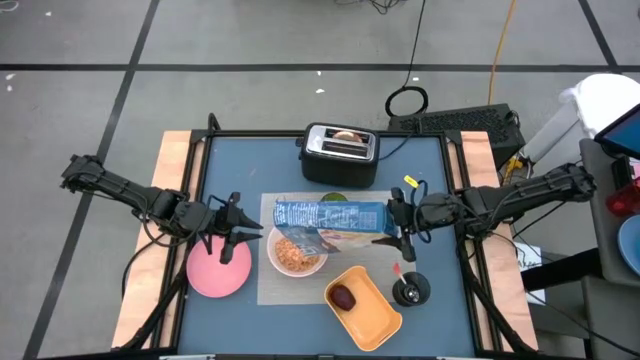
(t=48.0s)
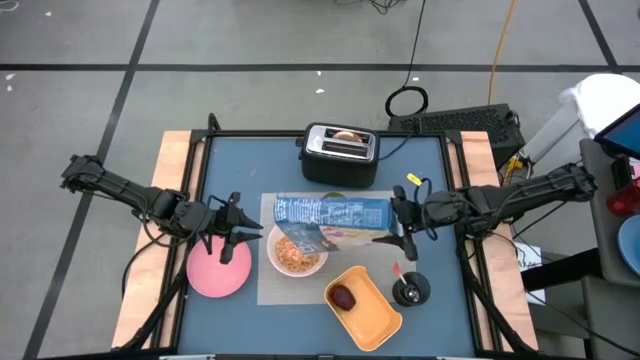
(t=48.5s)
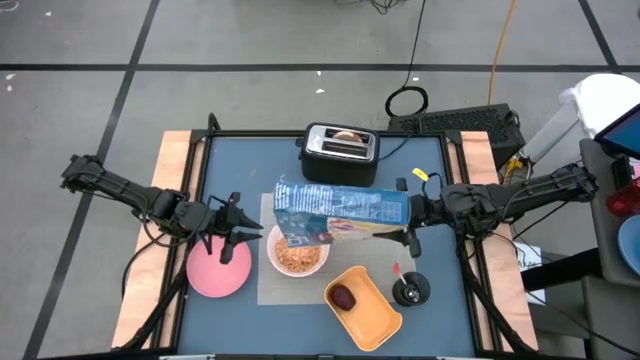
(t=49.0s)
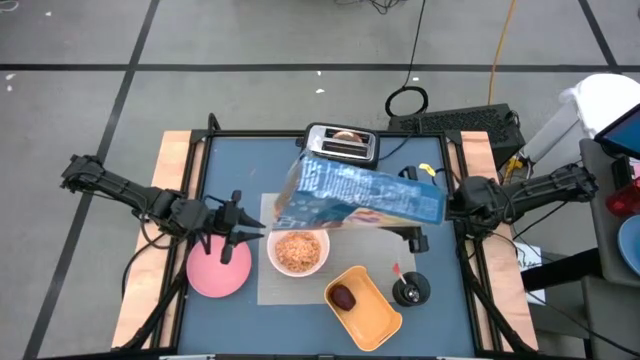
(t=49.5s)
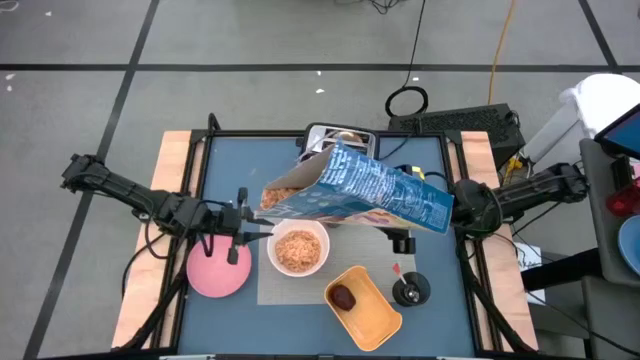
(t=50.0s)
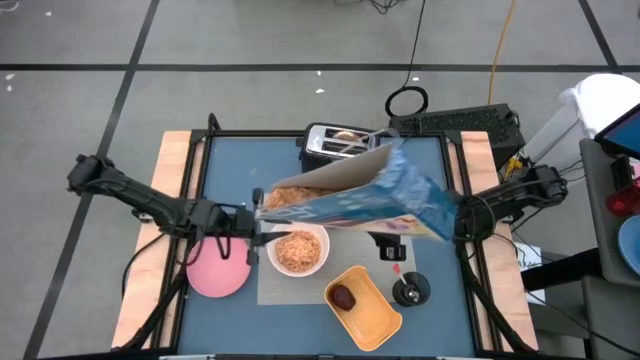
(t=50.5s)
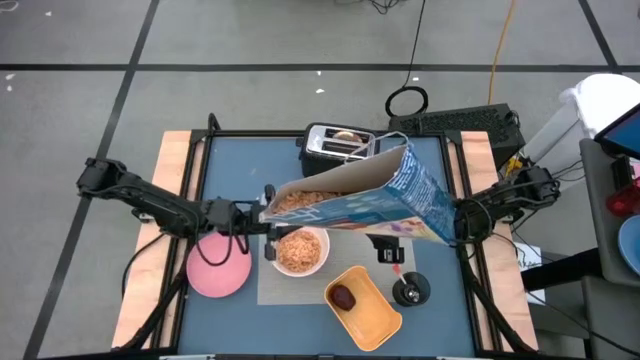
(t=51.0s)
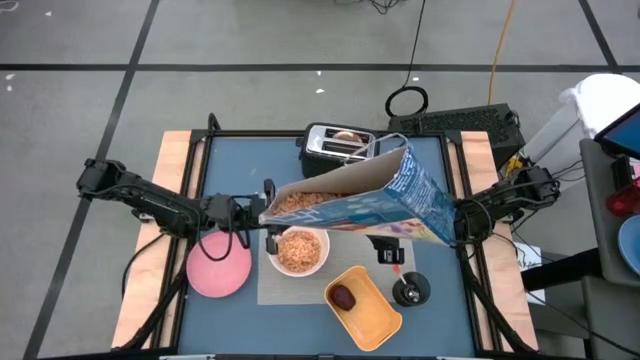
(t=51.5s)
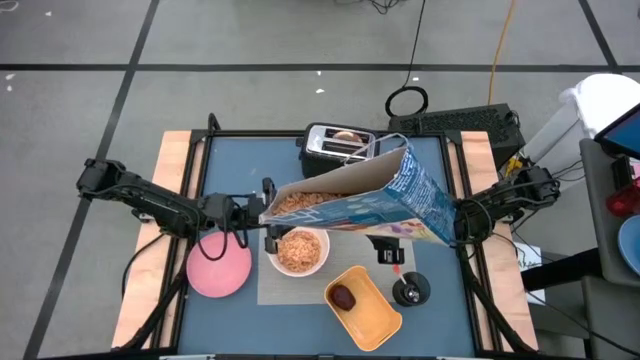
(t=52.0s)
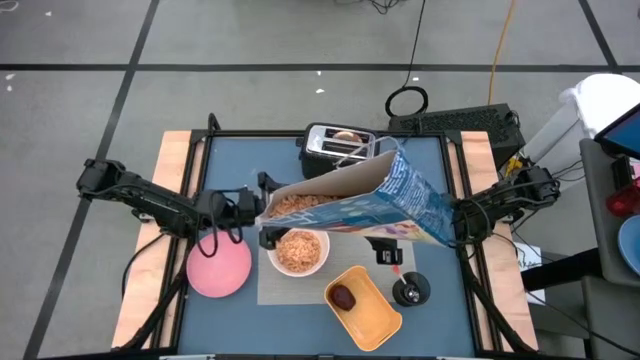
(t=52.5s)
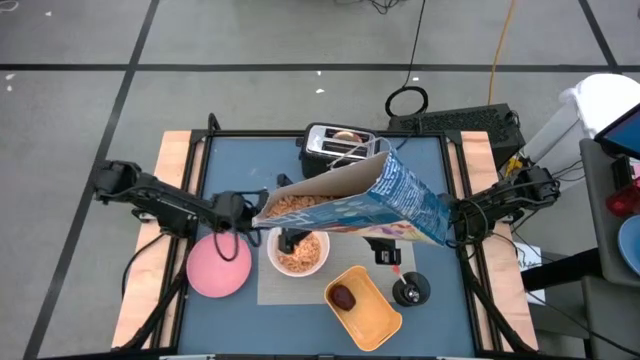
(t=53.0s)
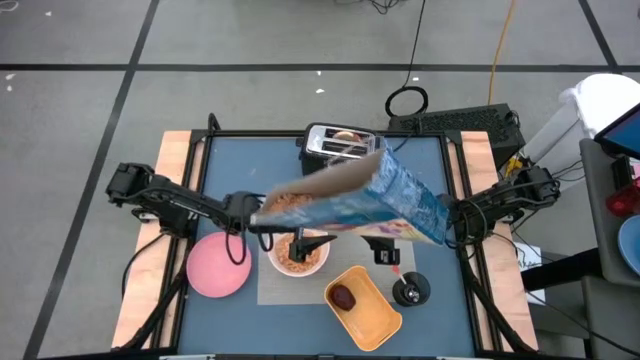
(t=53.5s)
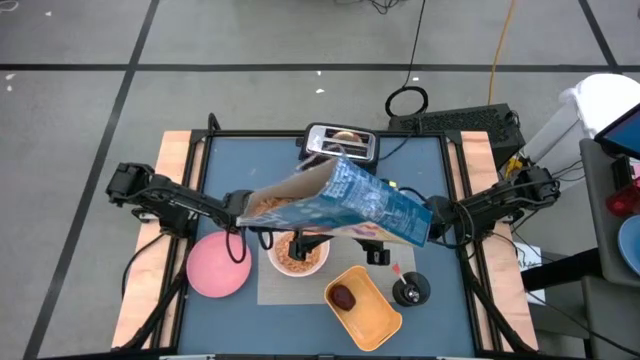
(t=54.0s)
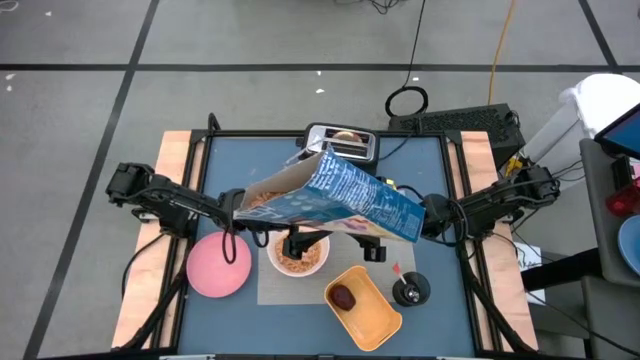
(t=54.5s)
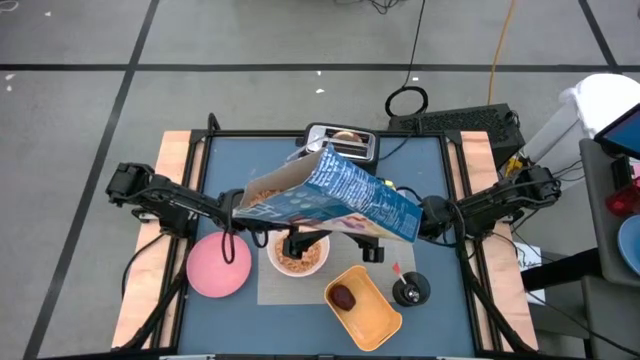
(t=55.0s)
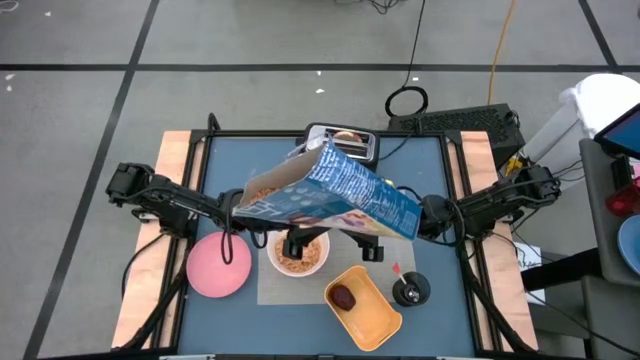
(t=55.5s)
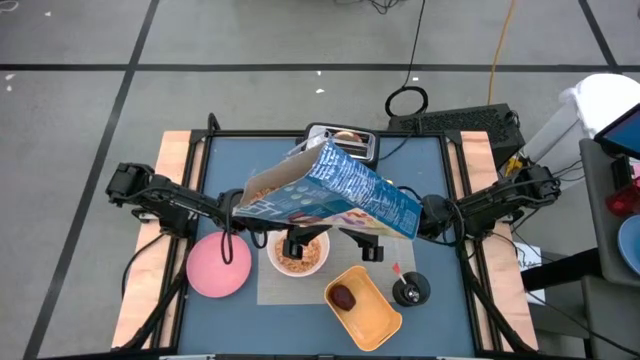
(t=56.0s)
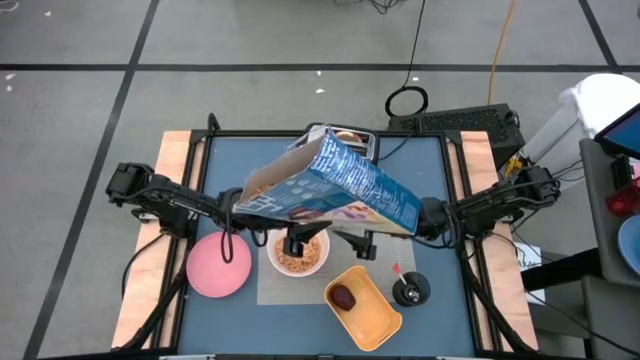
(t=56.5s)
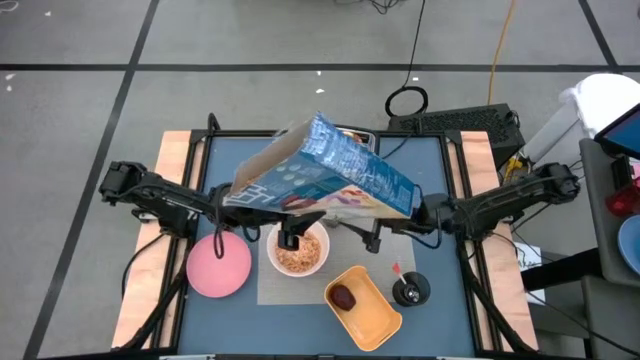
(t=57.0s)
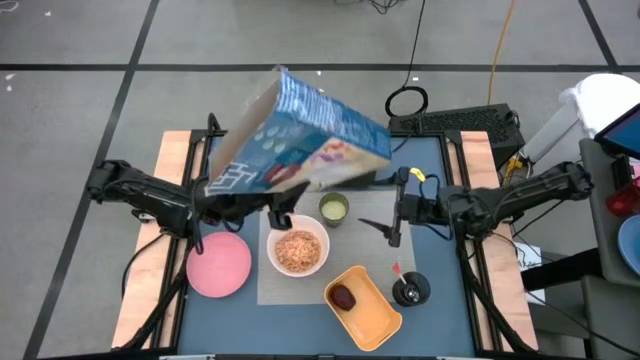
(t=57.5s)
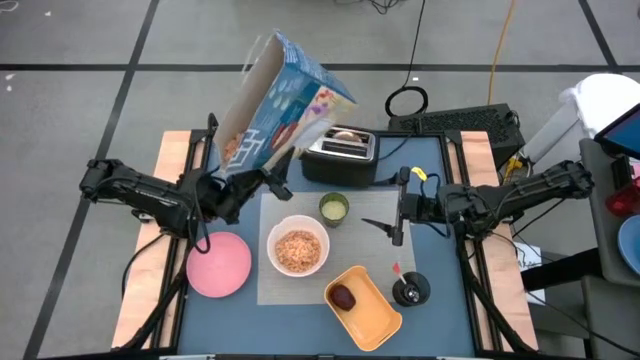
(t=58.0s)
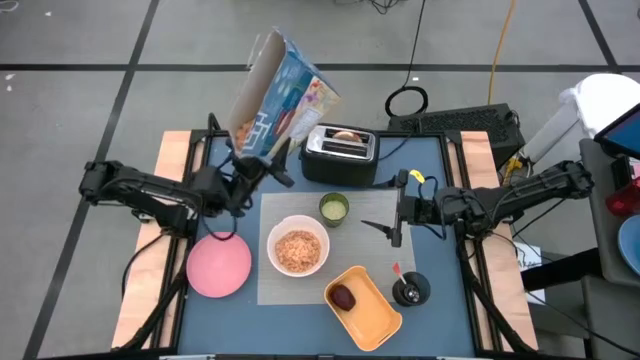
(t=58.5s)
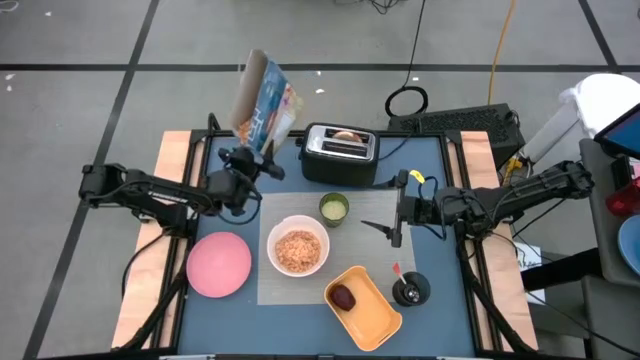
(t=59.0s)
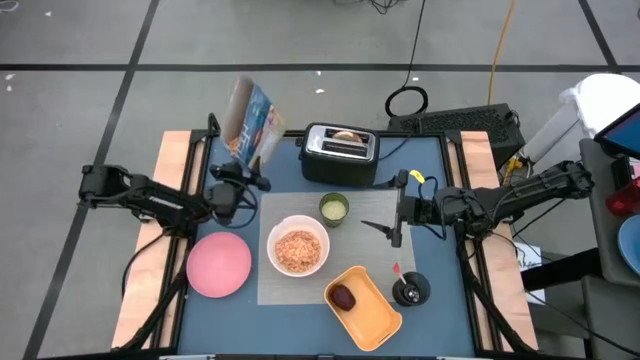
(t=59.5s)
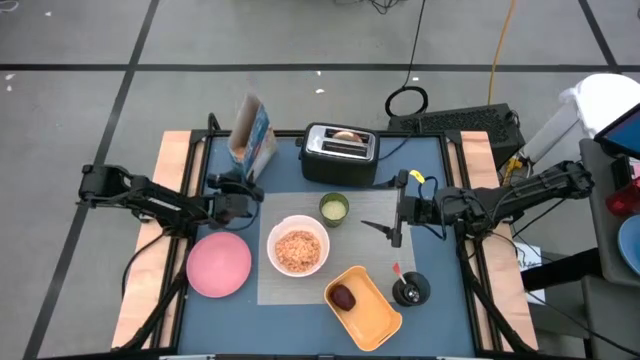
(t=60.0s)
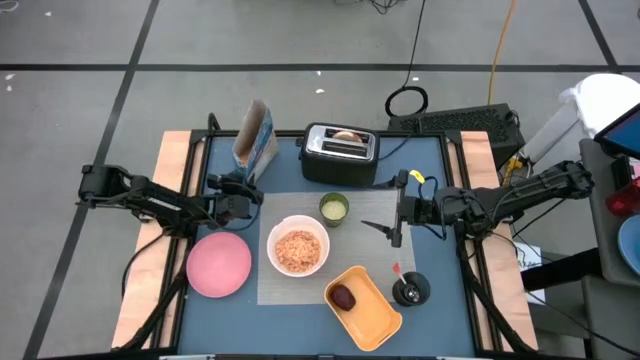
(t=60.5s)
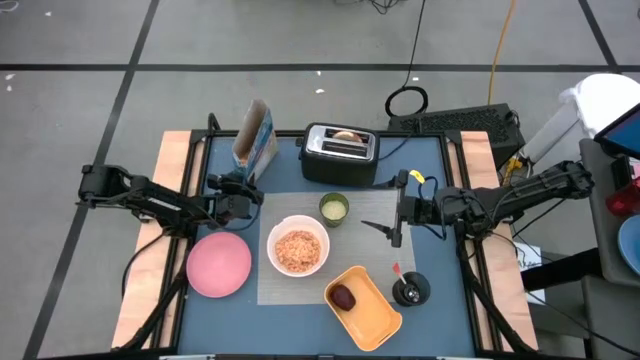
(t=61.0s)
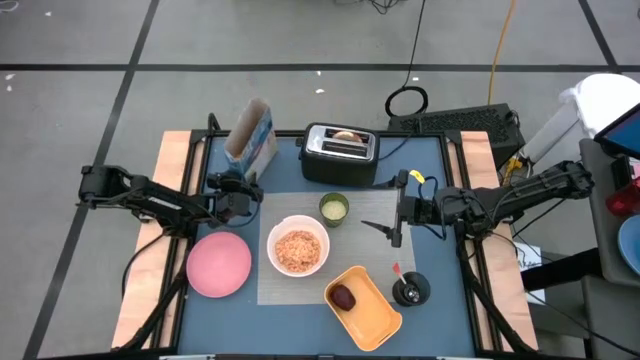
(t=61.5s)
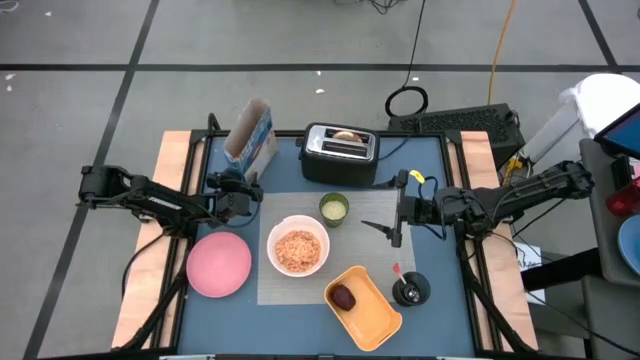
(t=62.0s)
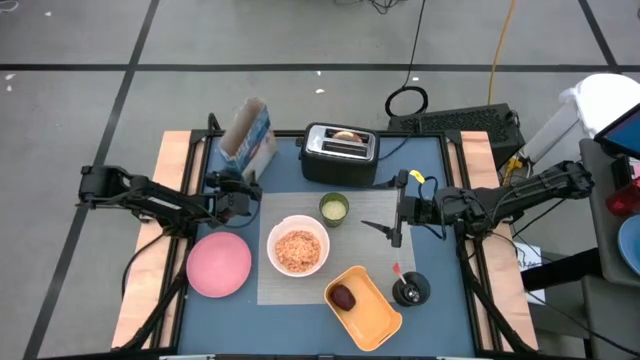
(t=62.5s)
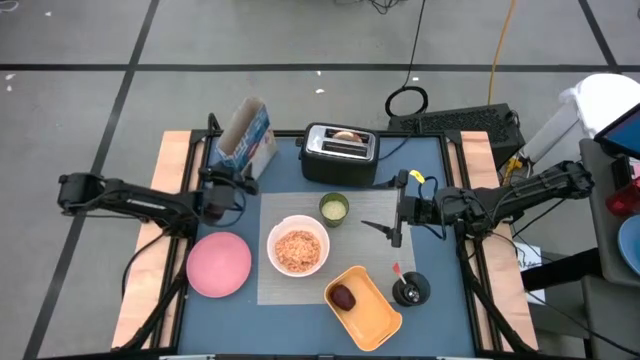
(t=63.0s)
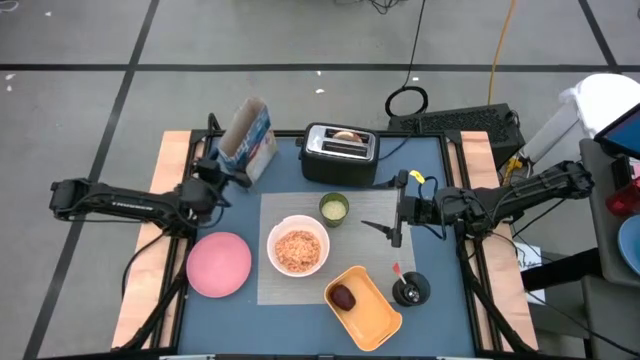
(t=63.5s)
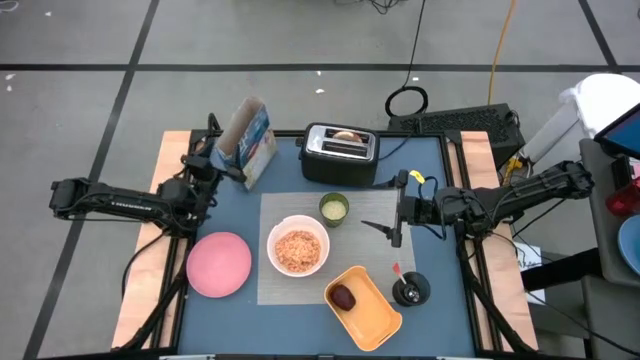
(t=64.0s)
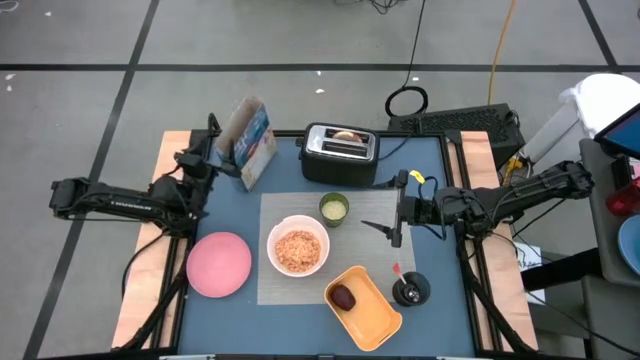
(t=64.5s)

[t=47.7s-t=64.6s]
Task: Arrange a breakfast setting
Pour the cereal into the white bowl

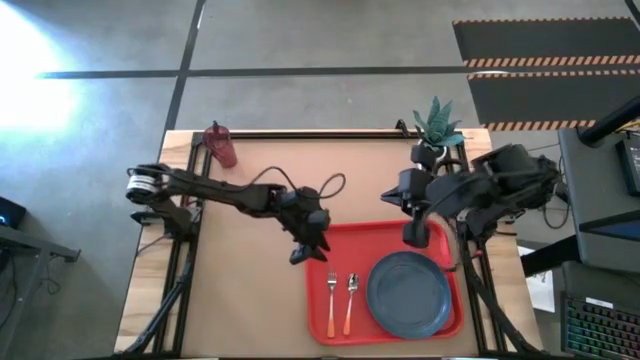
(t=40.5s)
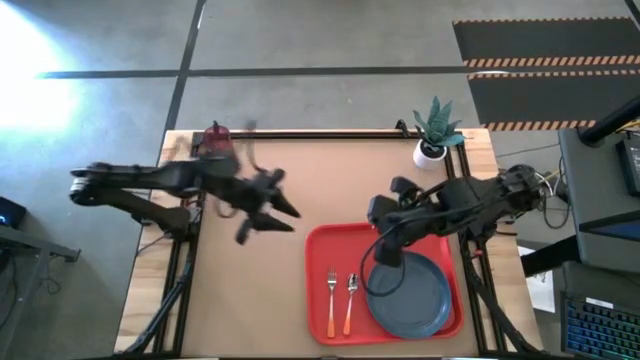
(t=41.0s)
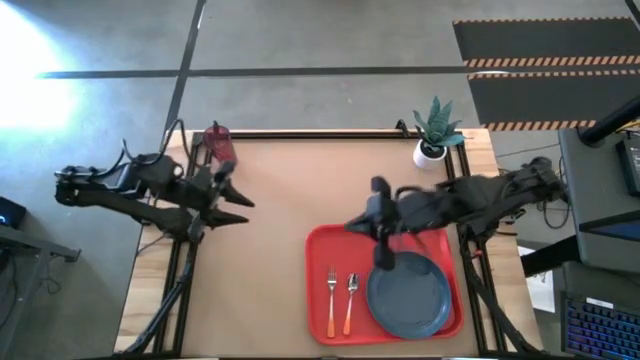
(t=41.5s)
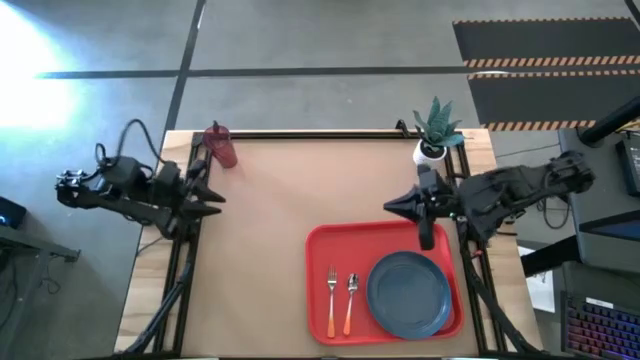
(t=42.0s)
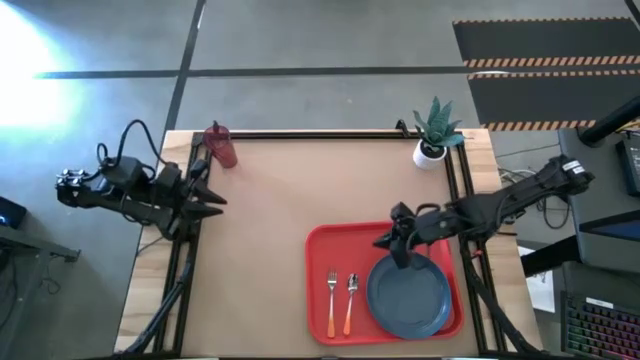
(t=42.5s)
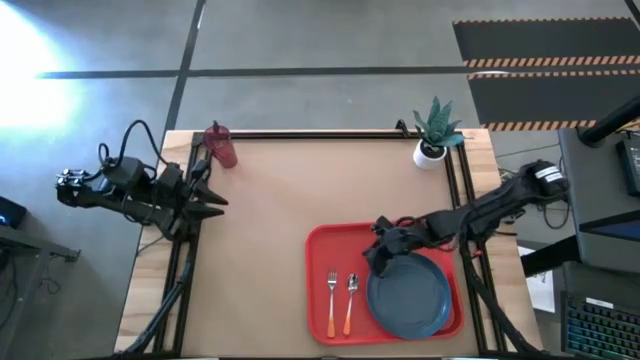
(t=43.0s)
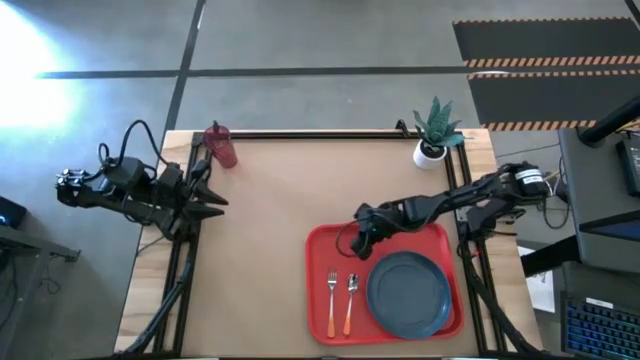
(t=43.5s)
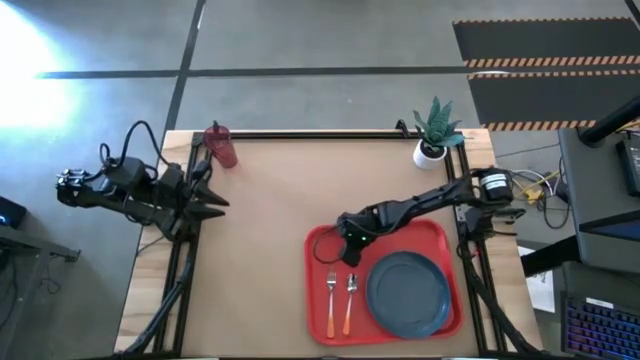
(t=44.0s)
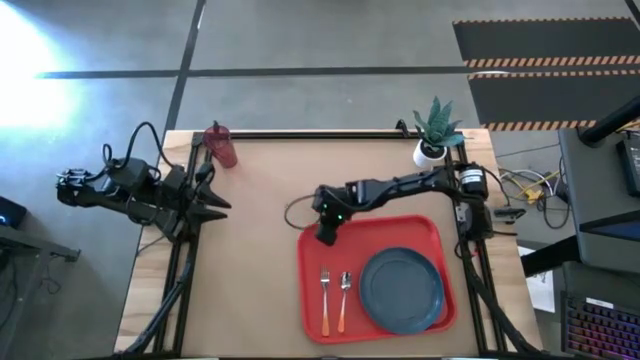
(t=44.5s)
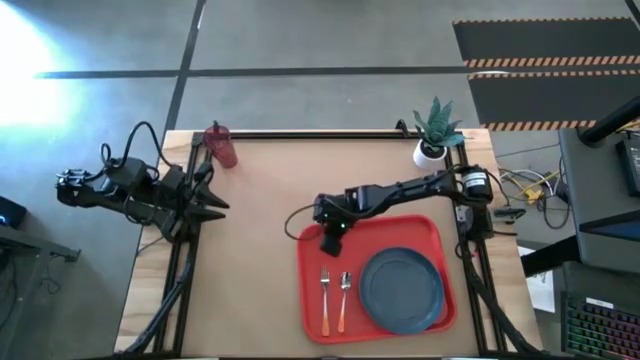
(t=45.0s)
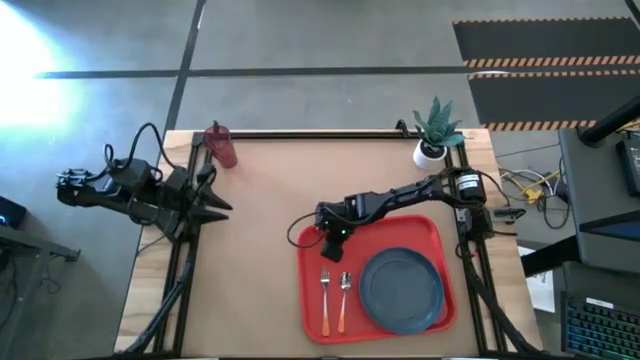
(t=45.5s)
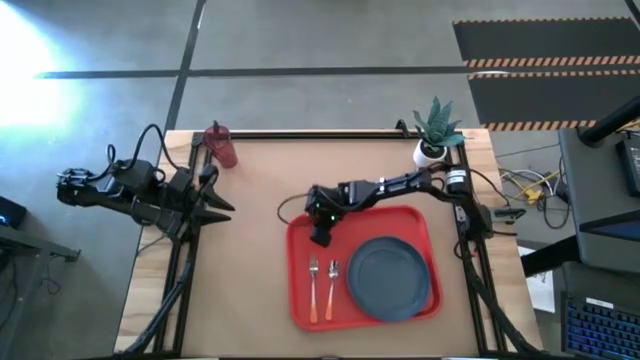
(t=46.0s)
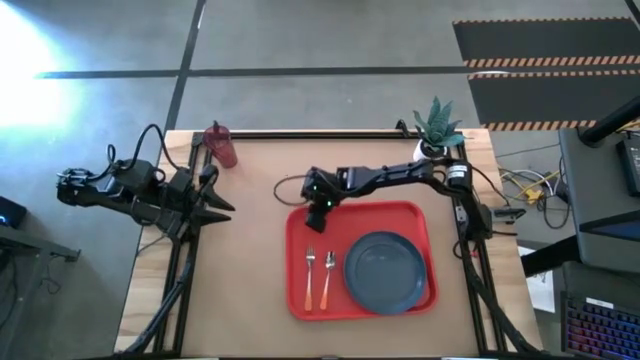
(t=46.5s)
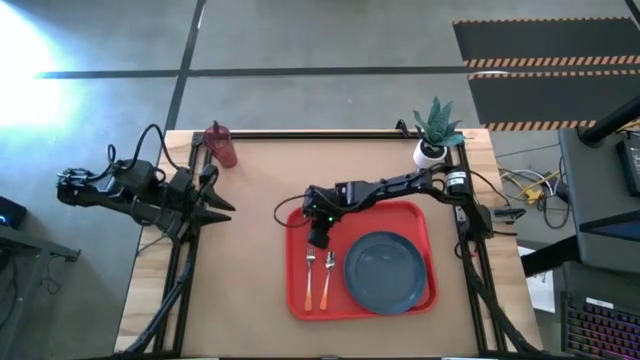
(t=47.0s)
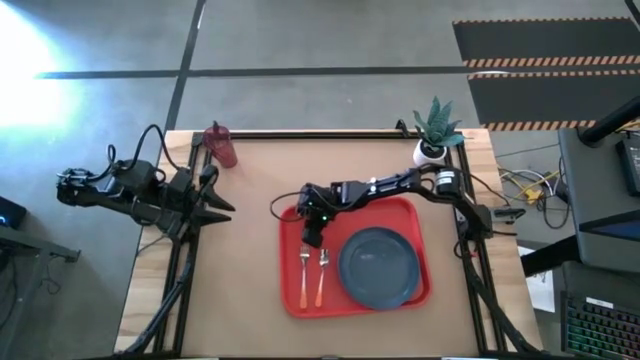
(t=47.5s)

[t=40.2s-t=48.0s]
Task: Pick and place plate/cup/fork/spoon on tray
Move the orange serving tray to the center of the table
